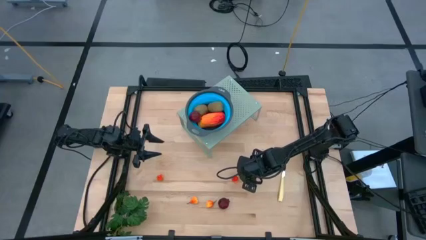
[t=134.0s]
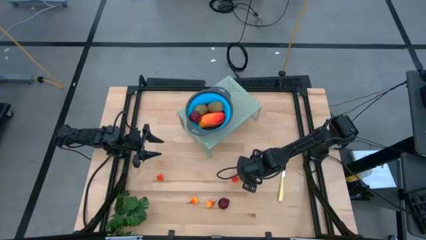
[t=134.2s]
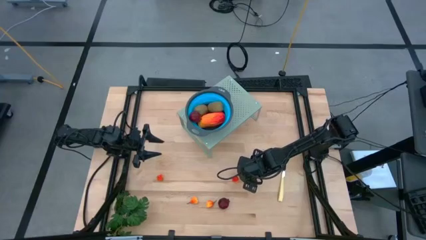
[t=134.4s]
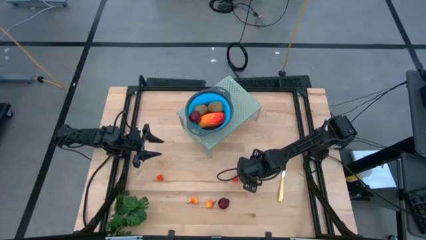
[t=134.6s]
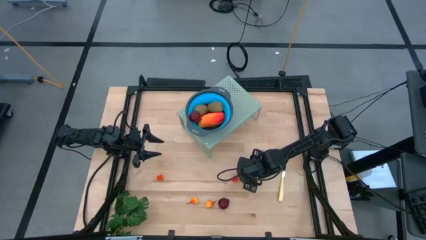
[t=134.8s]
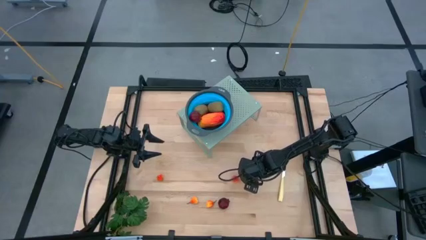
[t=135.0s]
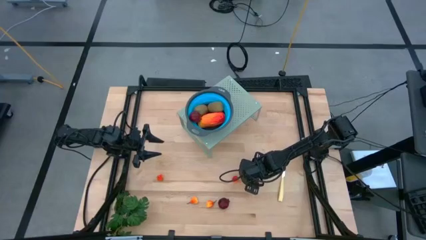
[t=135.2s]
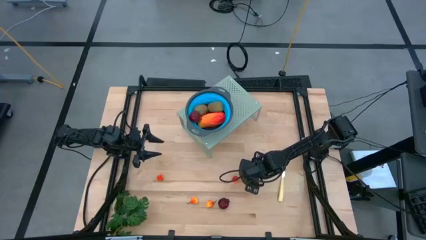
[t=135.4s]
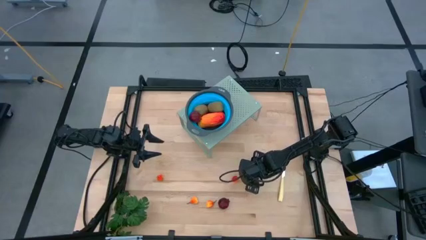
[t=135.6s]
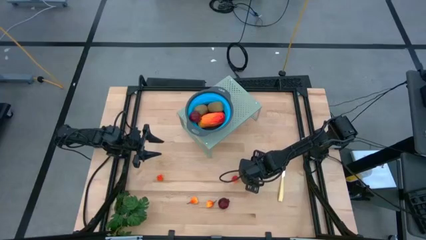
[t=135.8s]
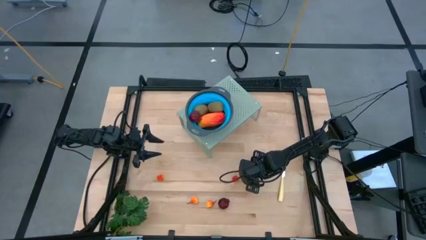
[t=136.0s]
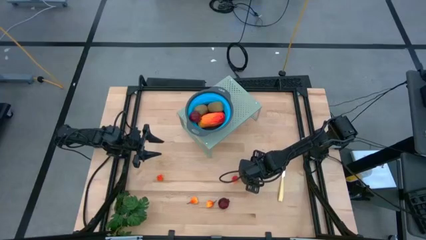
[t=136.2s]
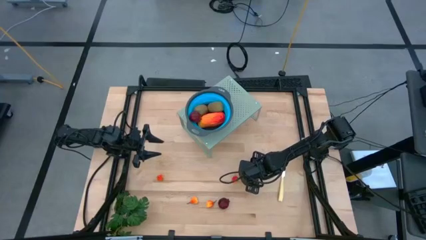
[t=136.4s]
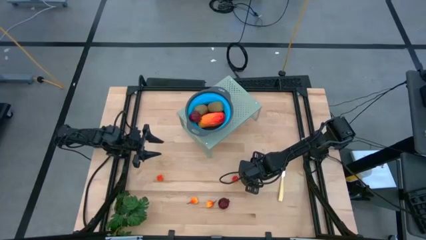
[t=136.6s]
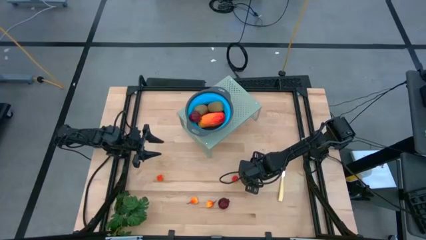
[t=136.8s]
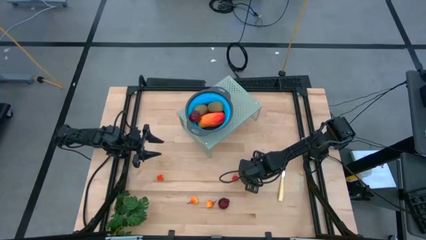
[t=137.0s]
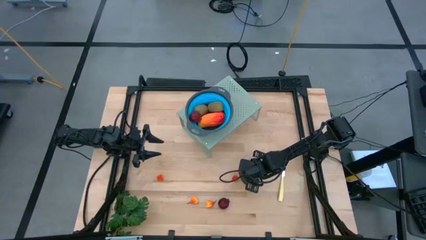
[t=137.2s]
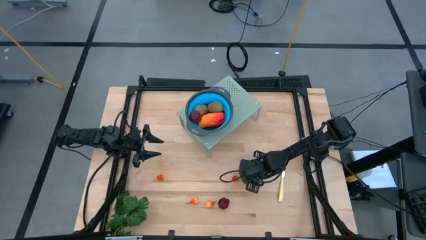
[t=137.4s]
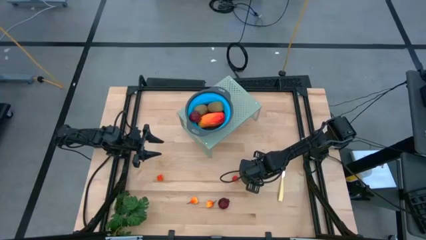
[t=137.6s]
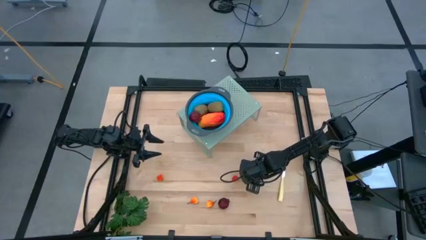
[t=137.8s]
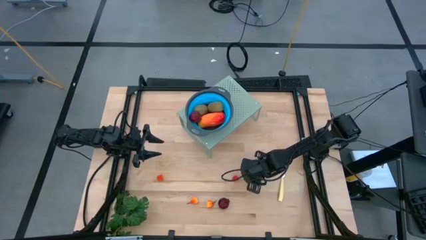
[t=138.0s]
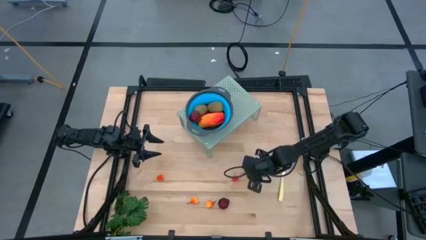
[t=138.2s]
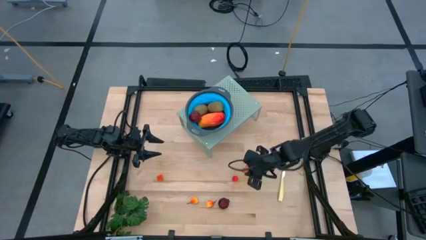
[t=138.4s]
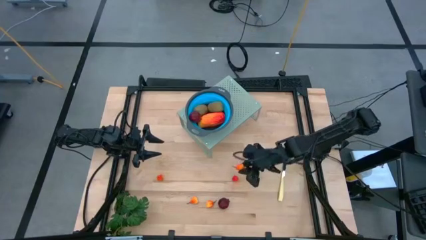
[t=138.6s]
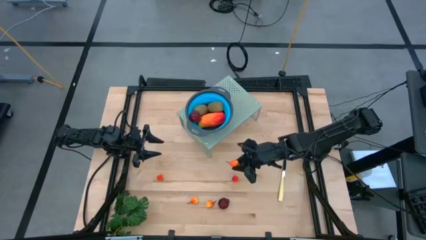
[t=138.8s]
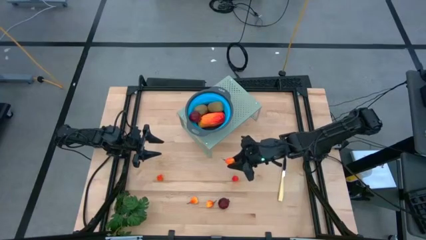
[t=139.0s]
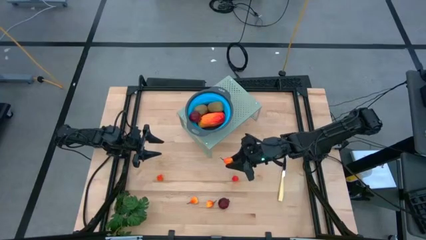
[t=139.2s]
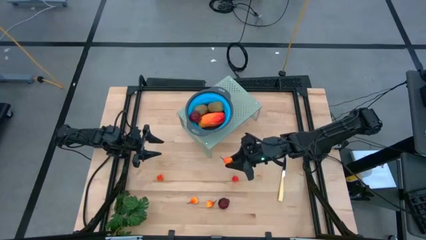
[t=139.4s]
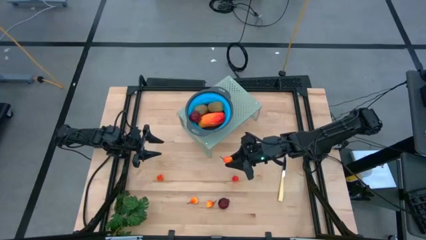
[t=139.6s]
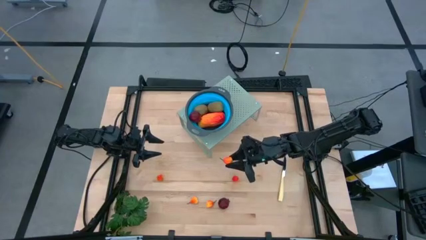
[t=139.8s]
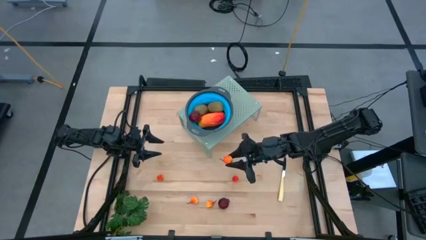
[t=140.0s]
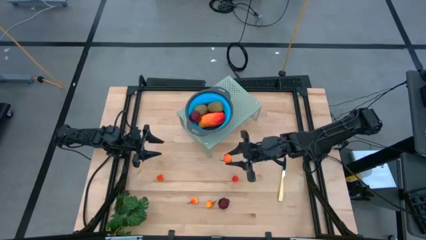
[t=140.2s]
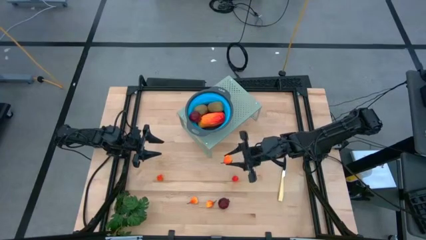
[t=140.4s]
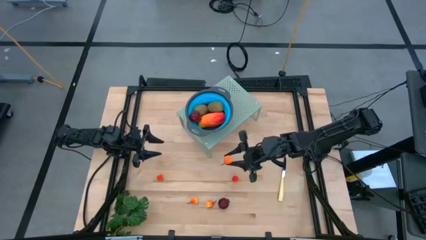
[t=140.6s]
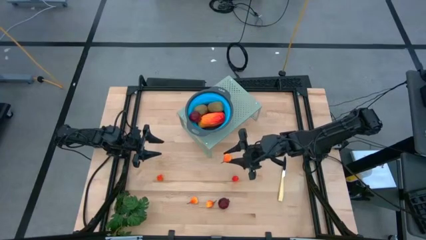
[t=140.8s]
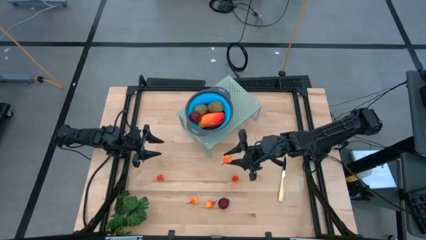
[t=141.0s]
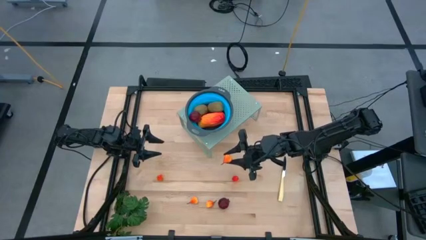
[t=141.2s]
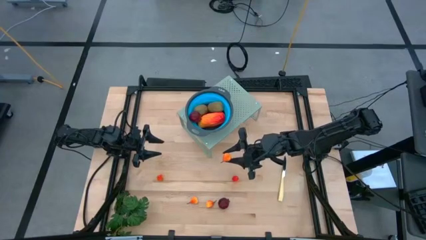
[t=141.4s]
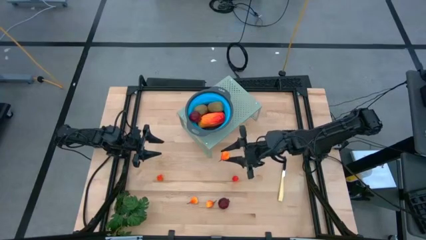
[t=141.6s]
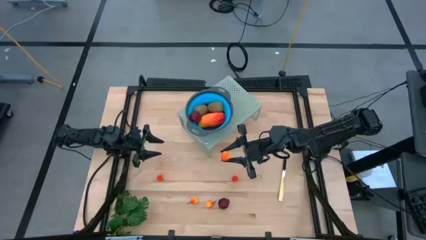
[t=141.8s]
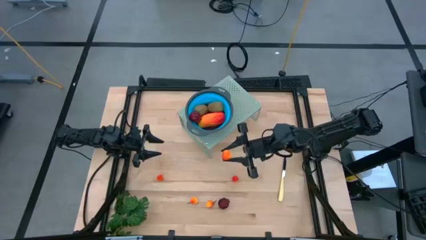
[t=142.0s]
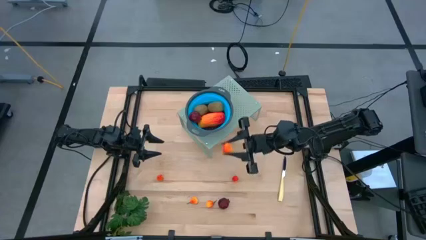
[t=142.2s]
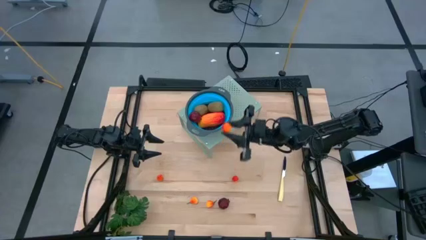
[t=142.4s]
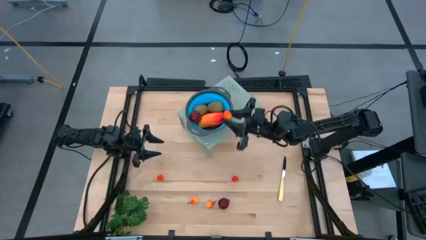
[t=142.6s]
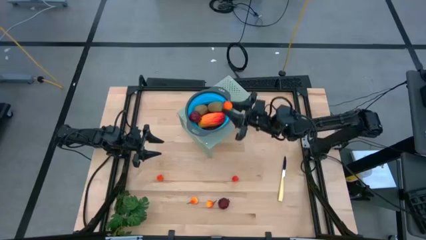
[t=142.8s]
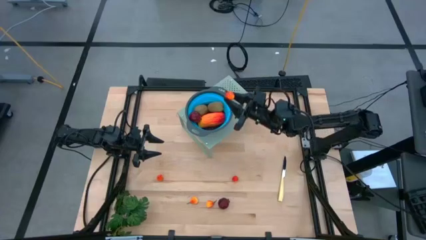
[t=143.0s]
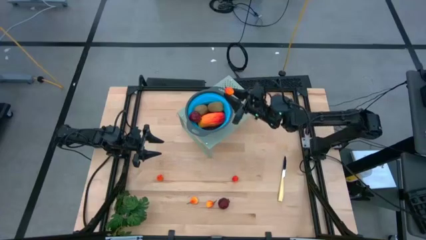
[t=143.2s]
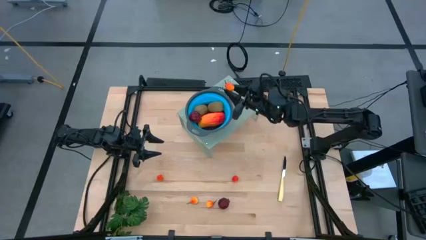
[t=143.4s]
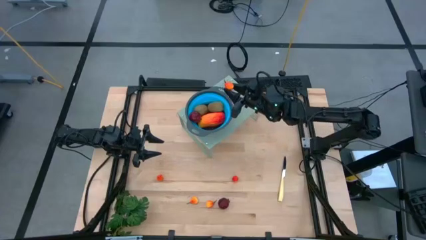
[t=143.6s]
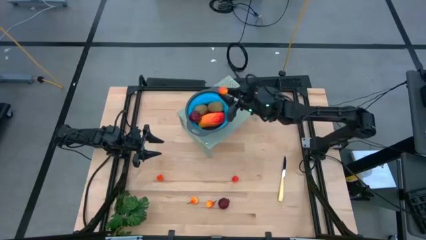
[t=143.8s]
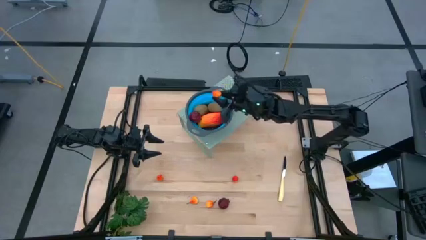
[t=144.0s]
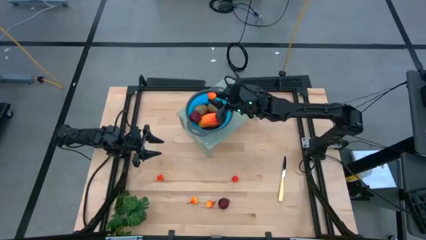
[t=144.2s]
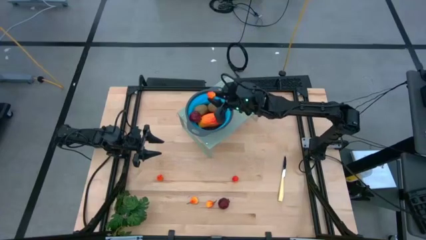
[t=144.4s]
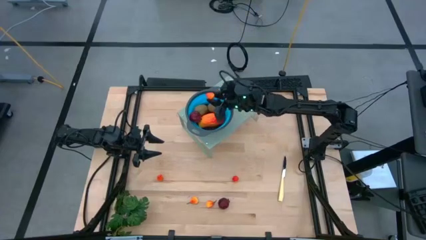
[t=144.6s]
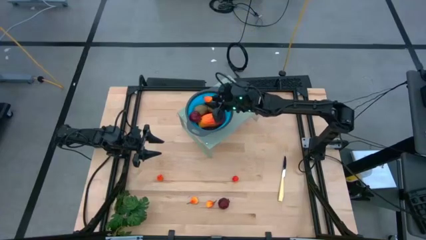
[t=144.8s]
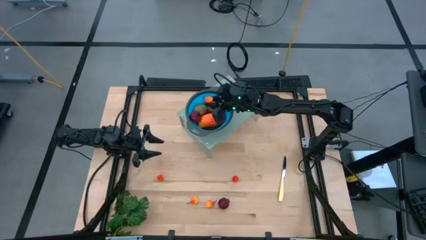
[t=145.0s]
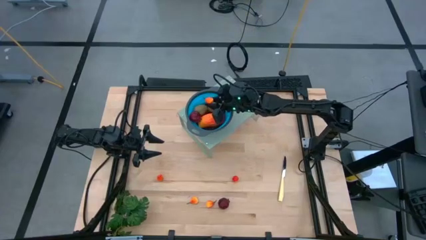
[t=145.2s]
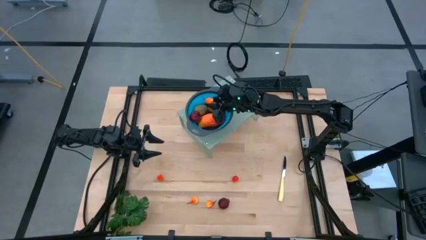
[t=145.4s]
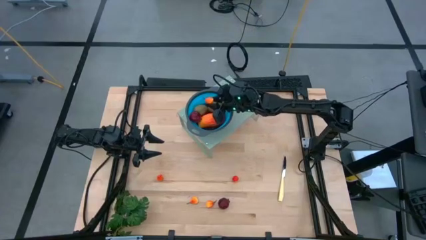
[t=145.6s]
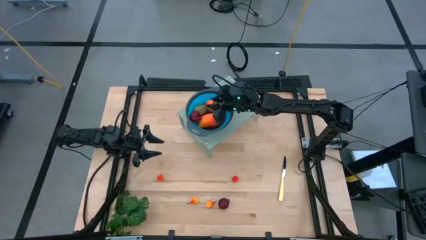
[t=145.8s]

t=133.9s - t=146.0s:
Task: Pick & Place Fruit
Put the red yellow peach into the blue strainer bowl on the shelf
